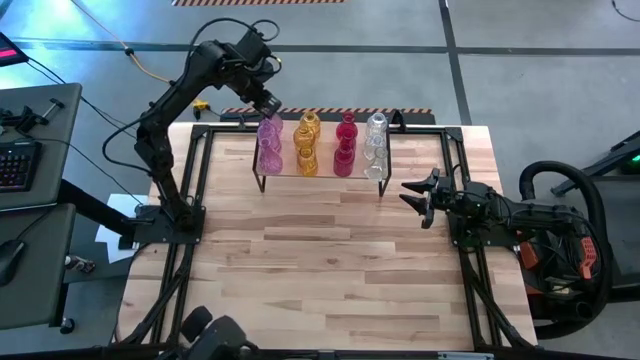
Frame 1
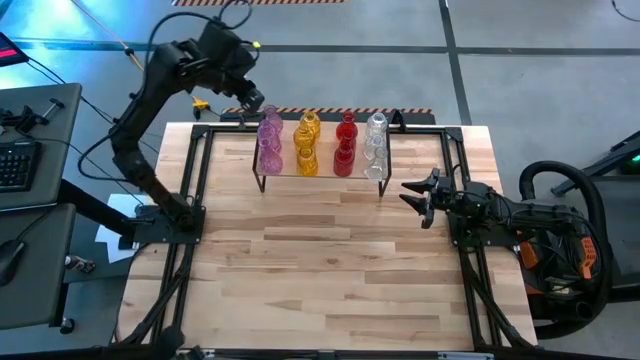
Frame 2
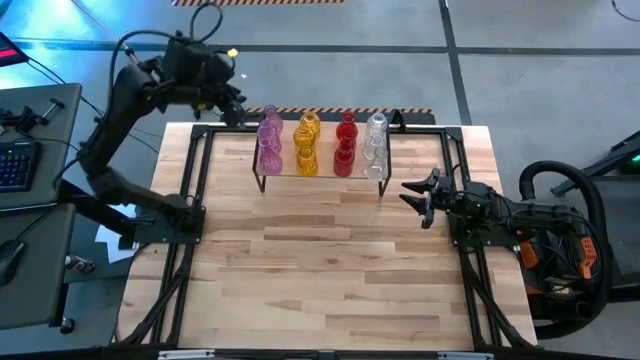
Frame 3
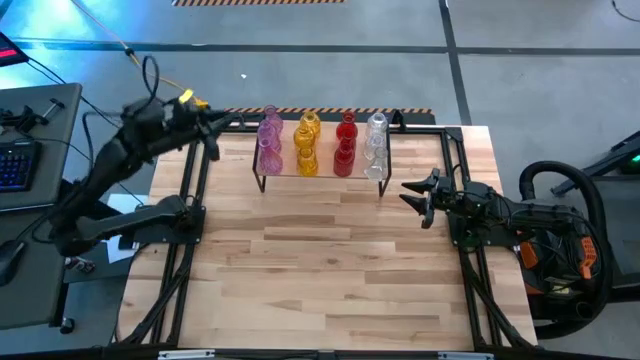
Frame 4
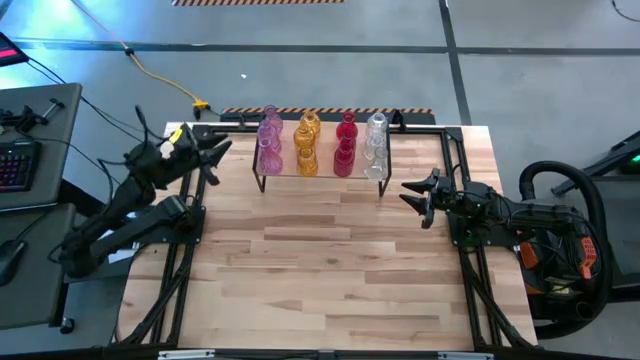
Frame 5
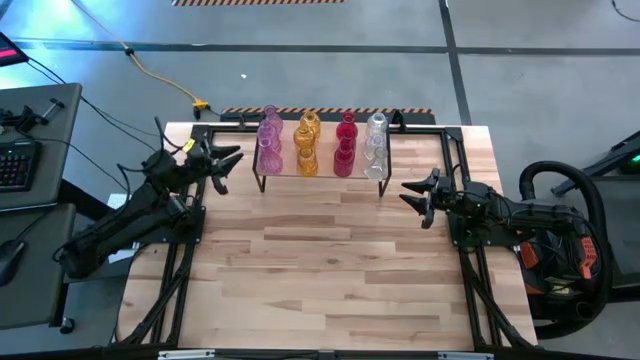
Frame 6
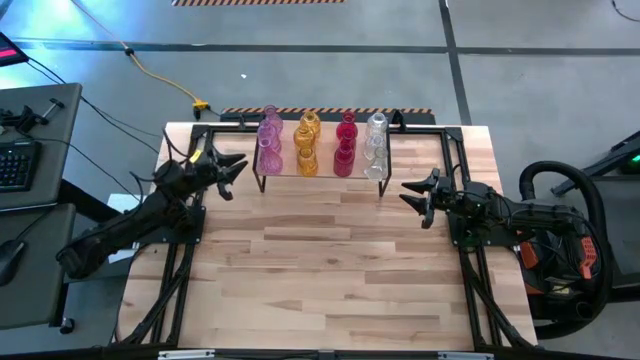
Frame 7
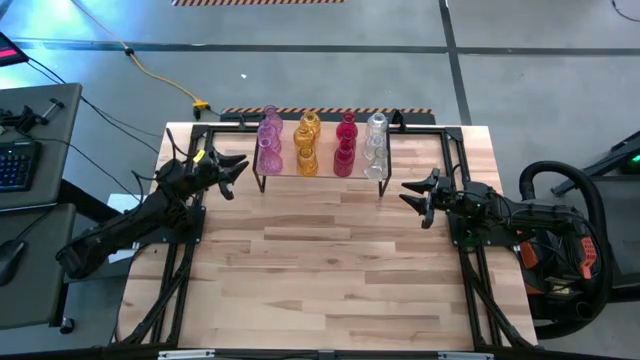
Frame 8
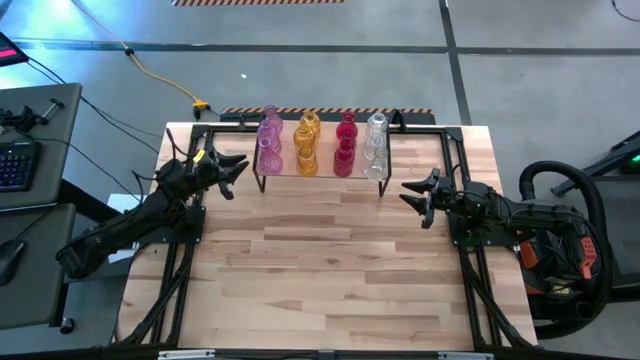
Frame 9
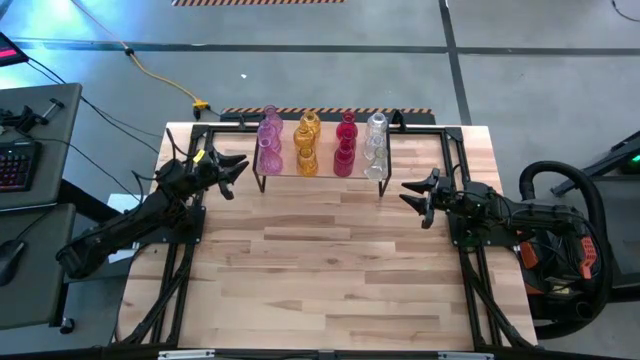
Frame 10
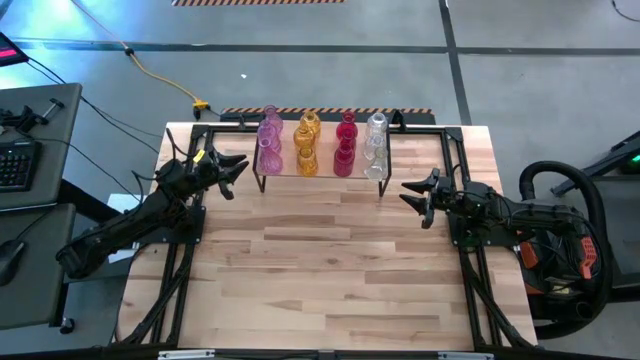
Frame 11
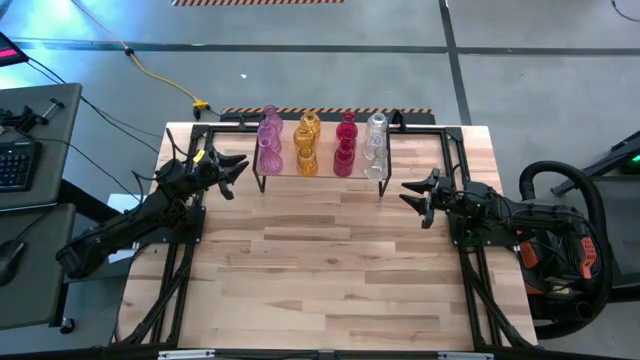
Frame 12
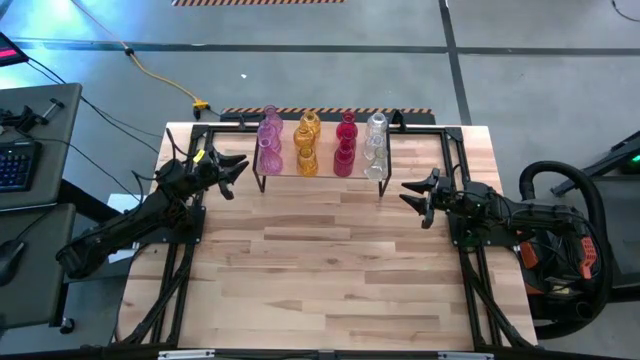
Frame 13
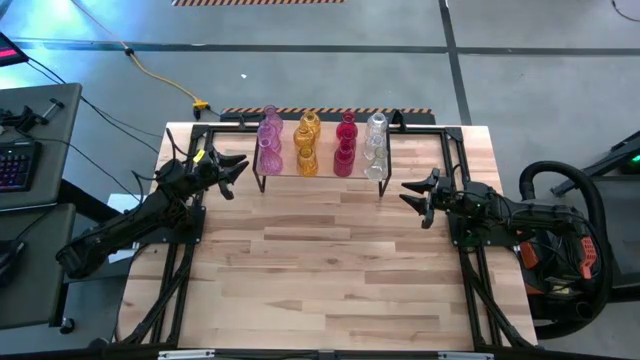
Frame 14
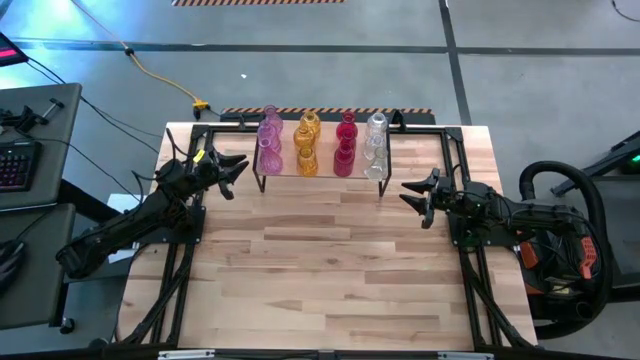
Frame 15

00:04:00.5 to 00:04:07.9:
Task: sort vases onto shelf
Return to Home Position

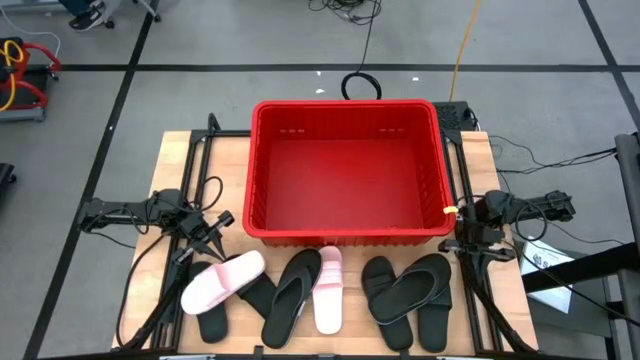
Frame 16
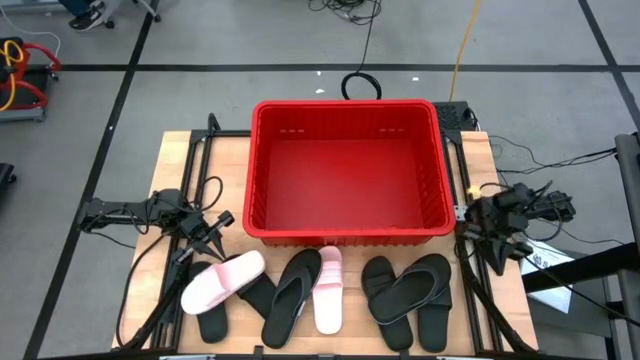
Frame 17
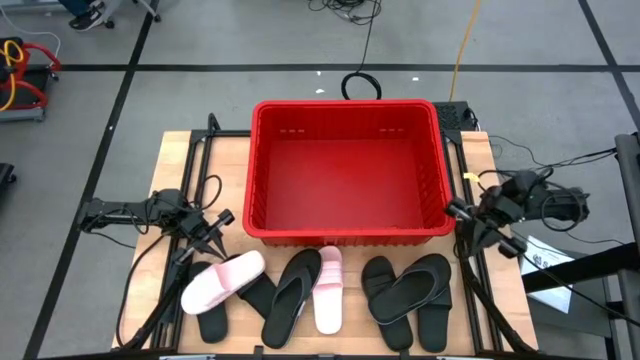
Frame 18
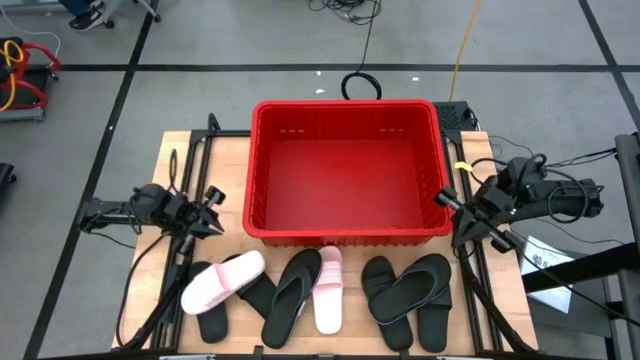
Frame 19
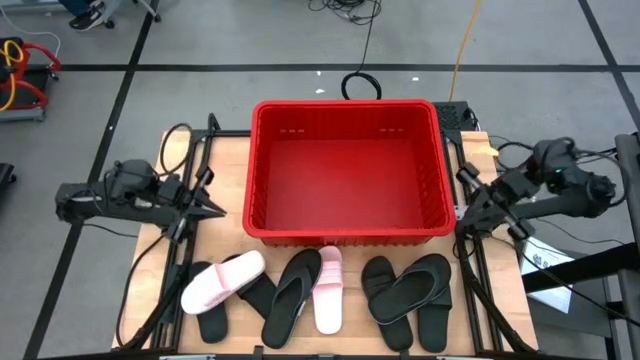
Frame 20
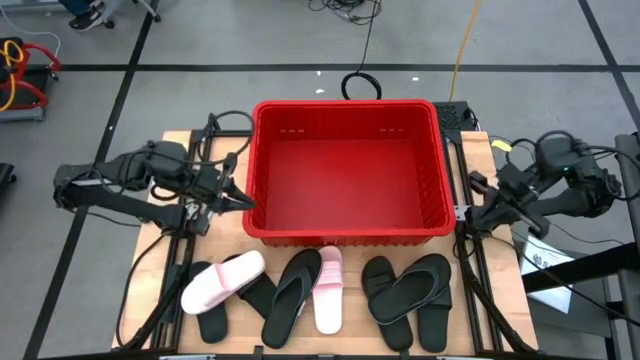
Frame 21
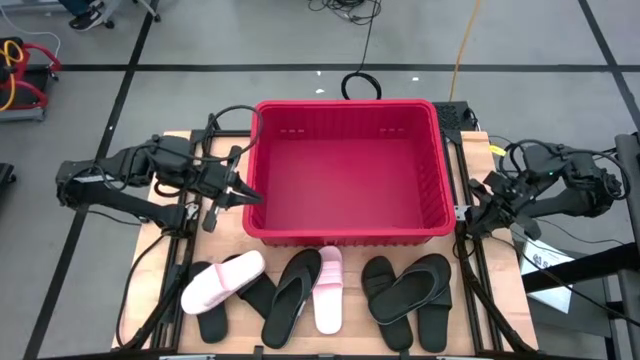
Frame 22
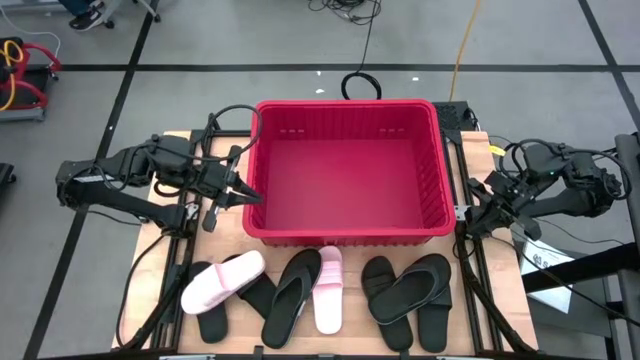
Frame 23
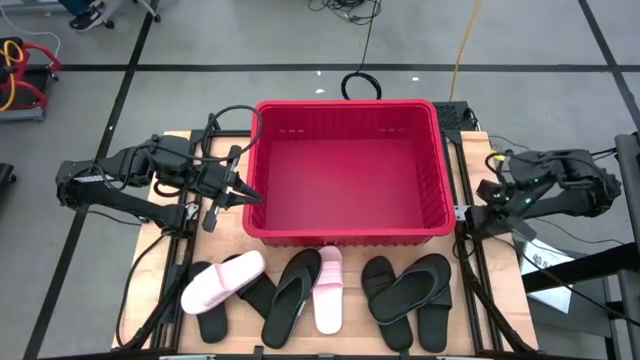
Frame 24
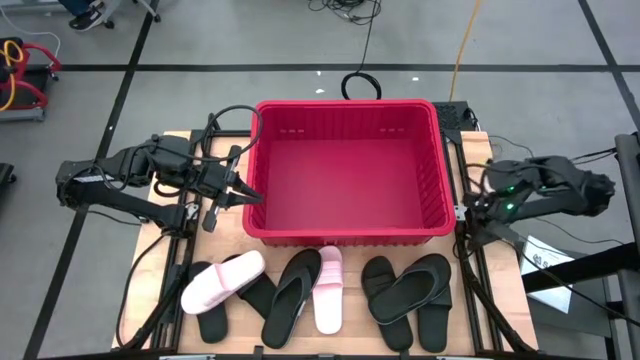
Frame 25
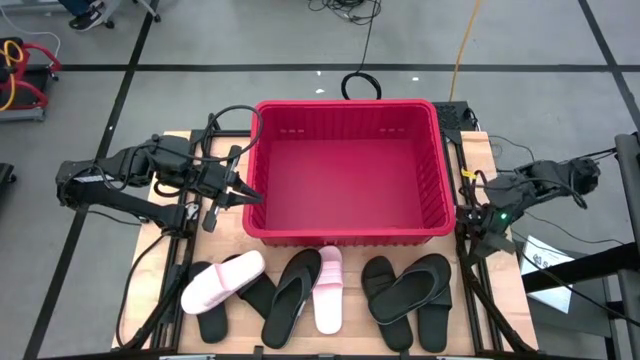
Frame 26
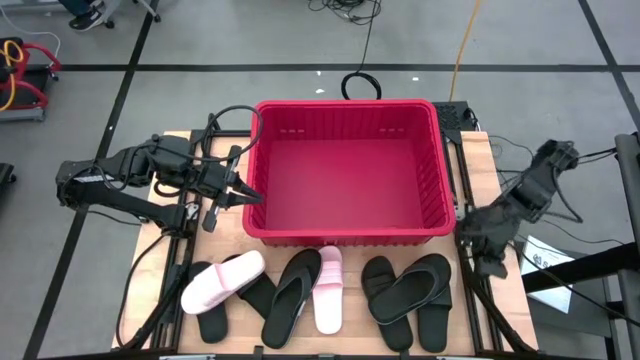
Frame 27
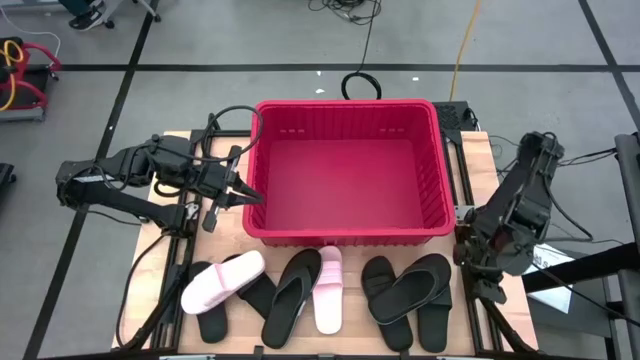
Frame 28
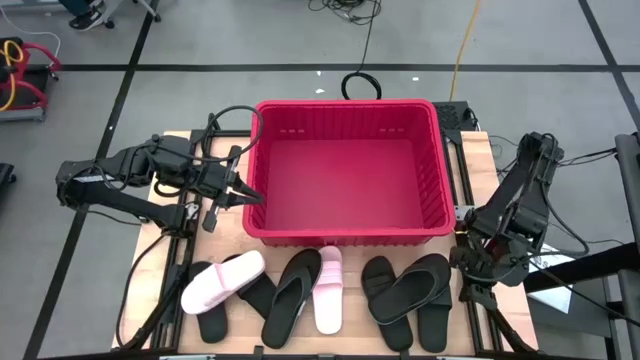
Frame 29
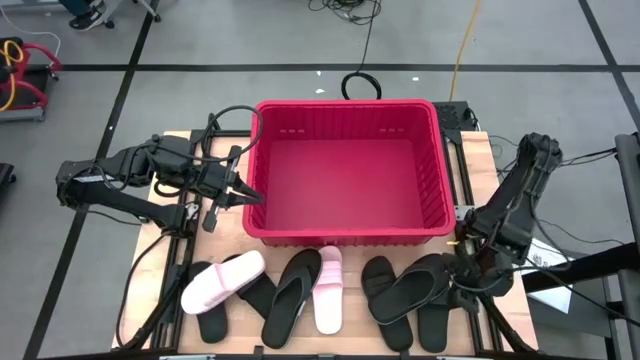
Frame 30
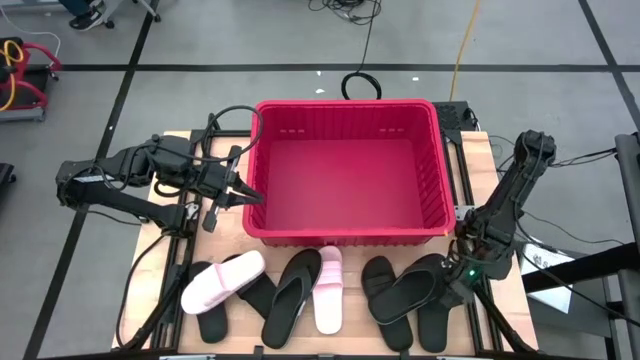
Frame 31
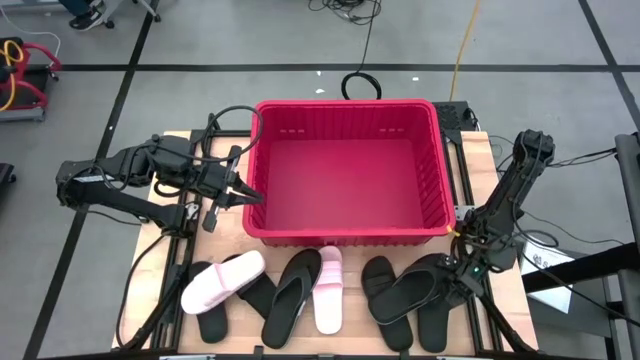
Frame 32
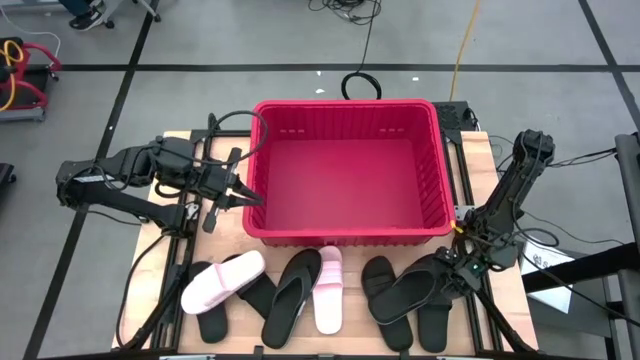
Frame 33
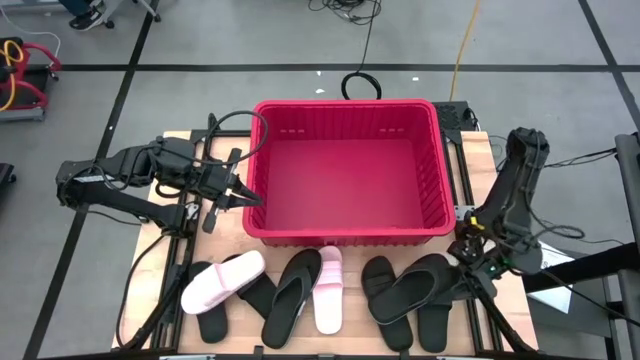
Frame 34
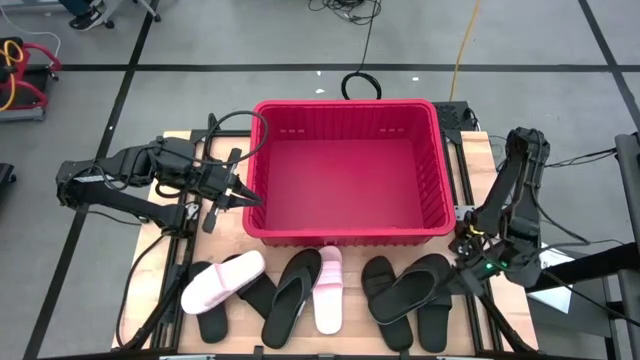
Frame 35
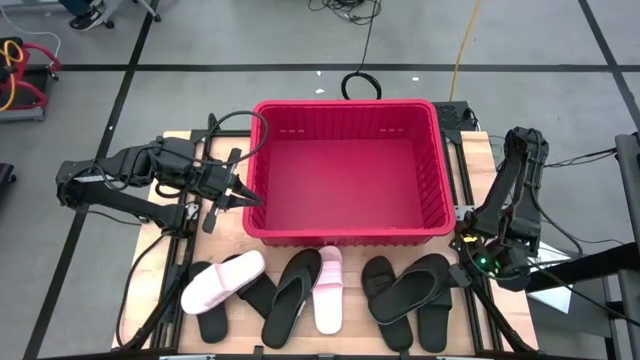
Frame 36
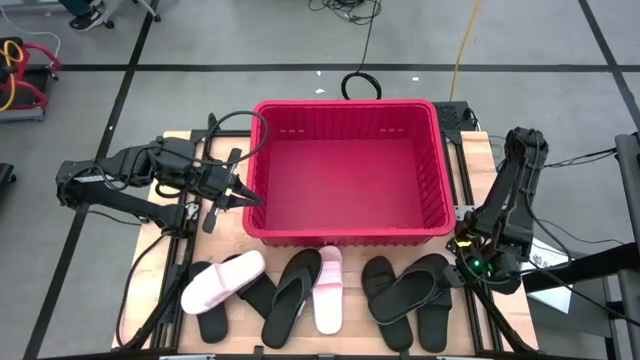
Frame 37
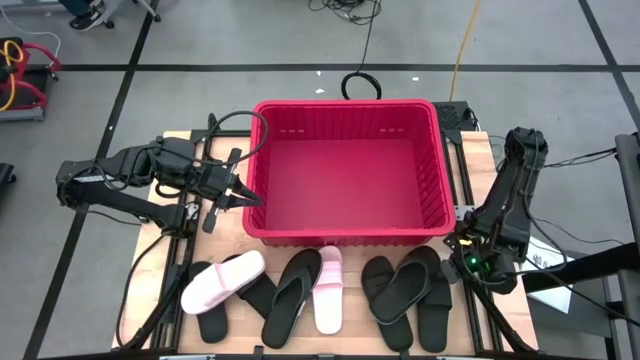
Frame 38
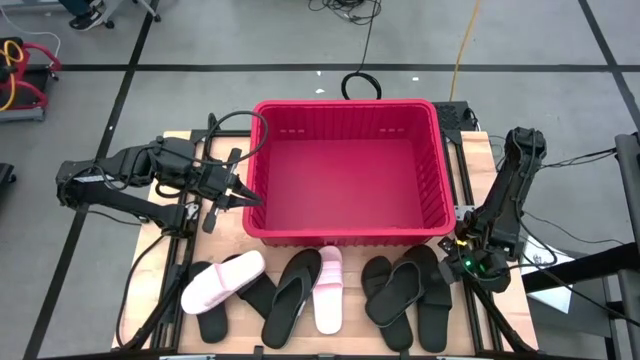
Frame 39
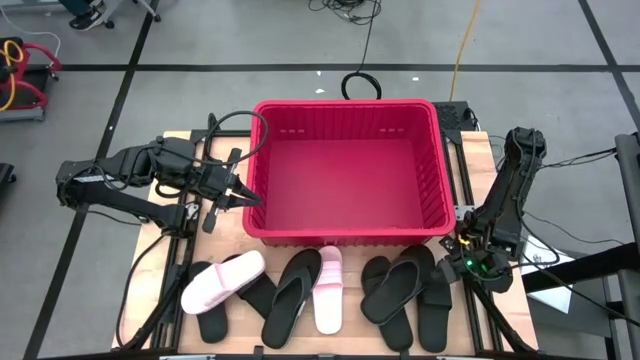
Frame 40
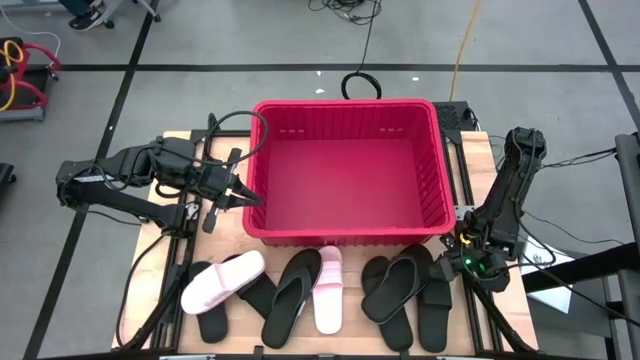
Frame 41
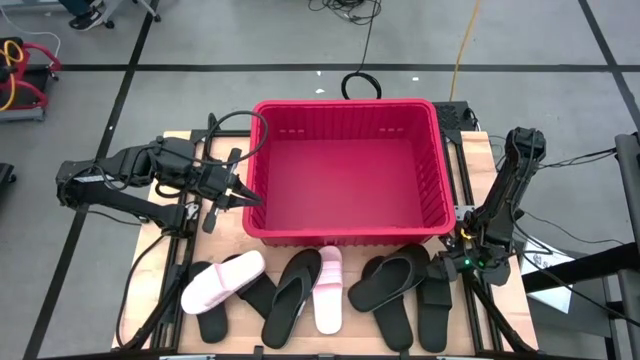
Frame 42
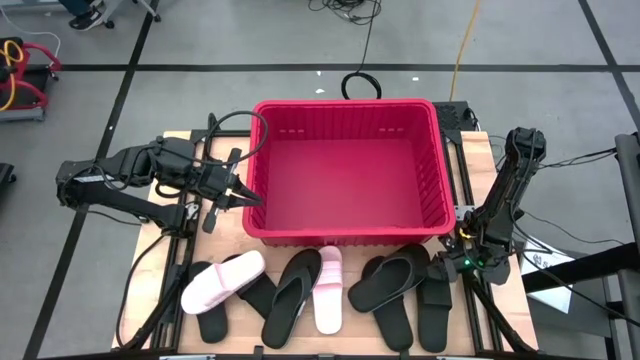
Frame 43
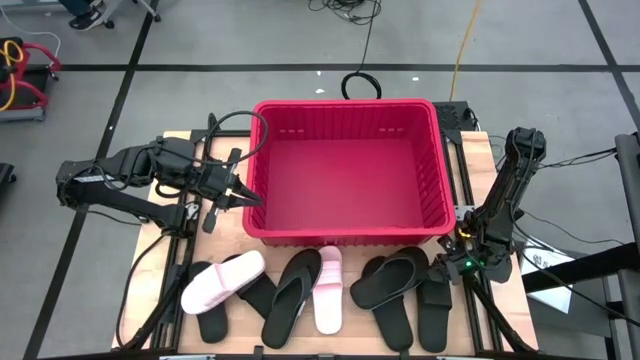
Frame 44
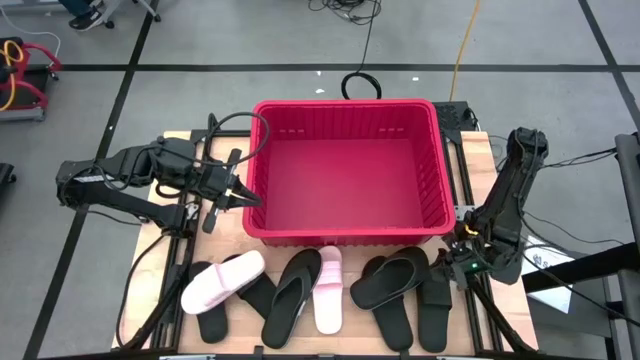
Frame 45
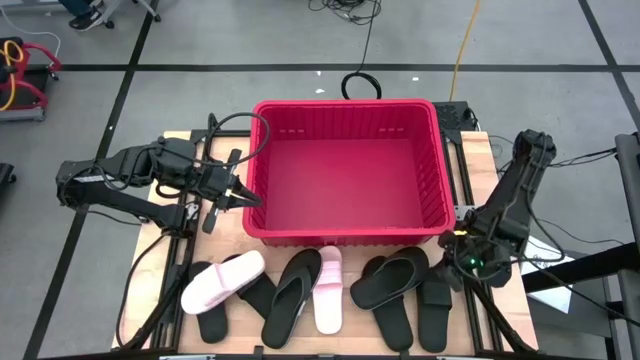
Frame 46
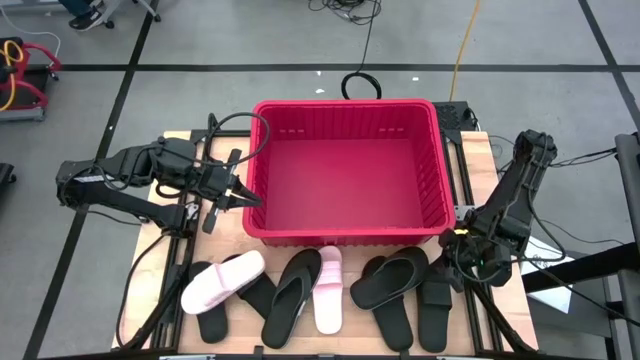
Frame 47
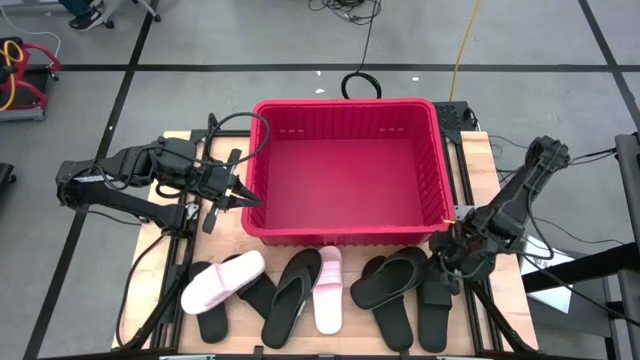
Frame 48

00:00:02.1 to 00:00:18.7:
Task: Pick and place slides into bin
Put the right black slipper into the red bin
